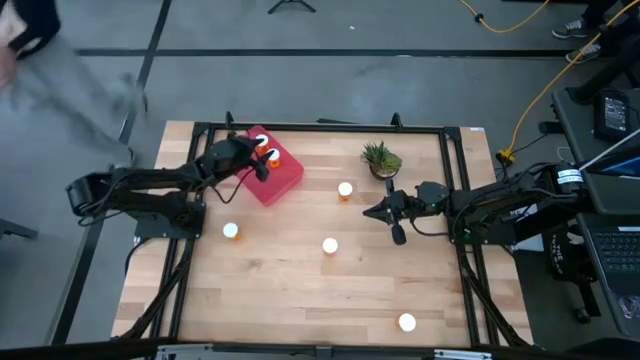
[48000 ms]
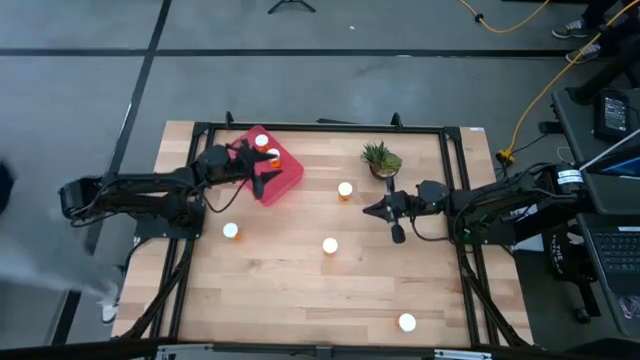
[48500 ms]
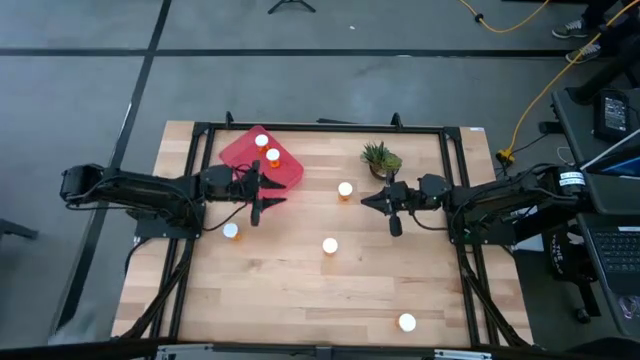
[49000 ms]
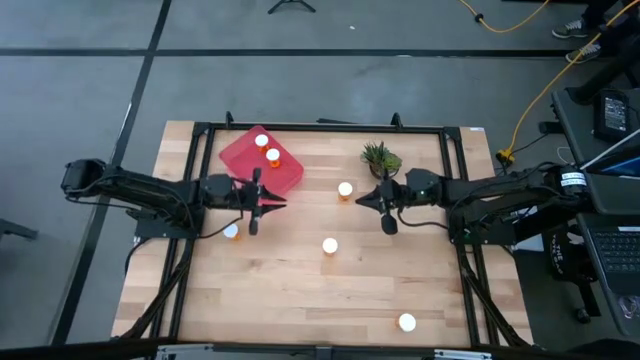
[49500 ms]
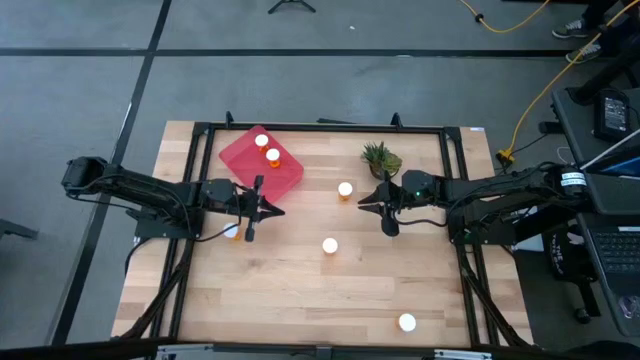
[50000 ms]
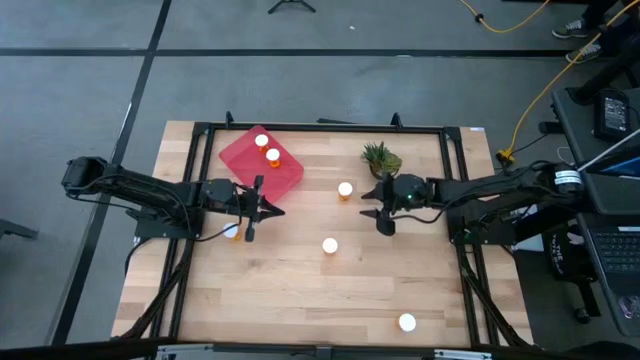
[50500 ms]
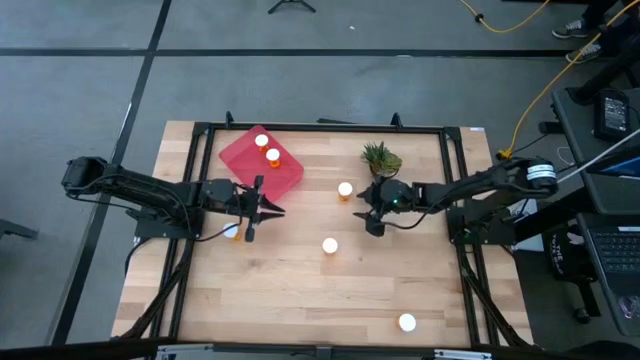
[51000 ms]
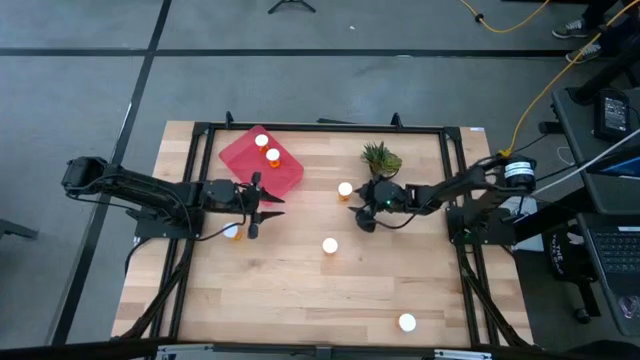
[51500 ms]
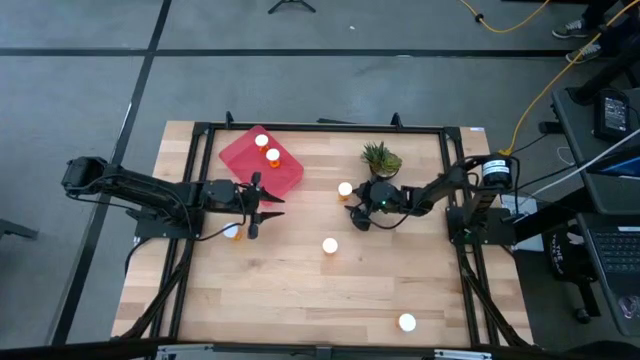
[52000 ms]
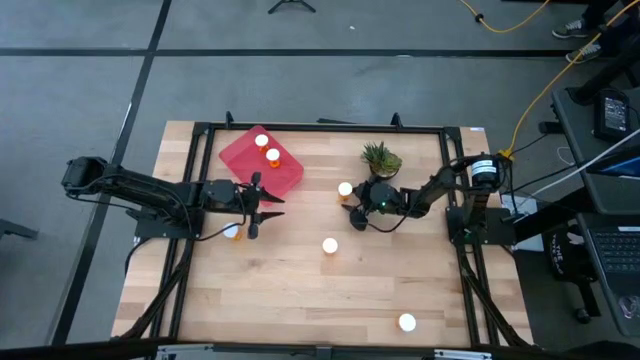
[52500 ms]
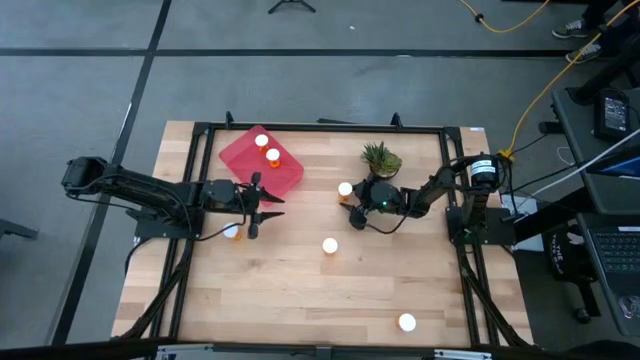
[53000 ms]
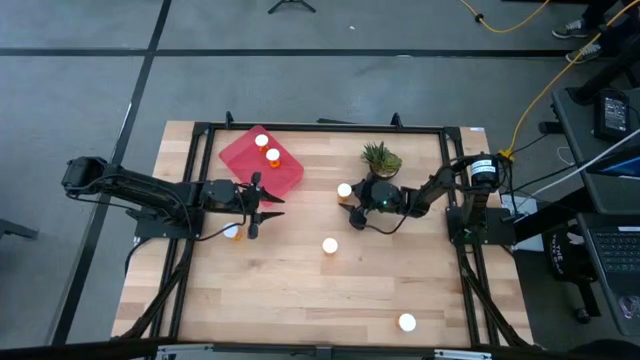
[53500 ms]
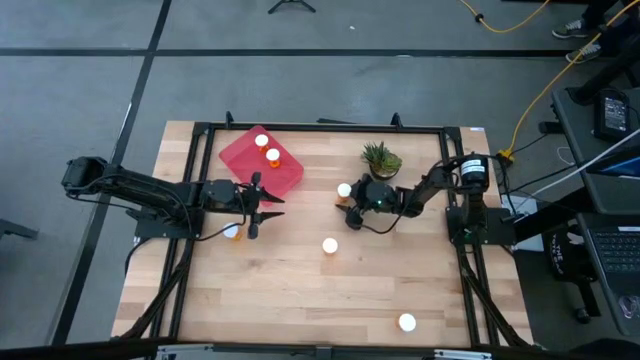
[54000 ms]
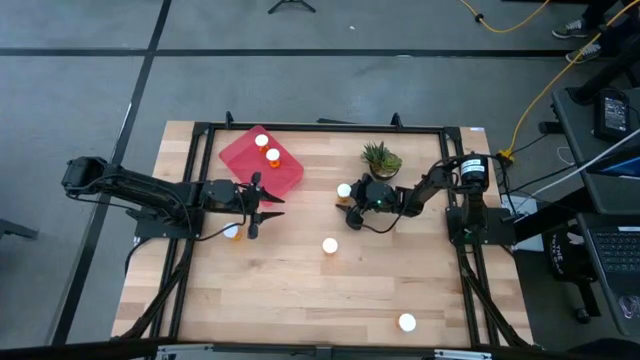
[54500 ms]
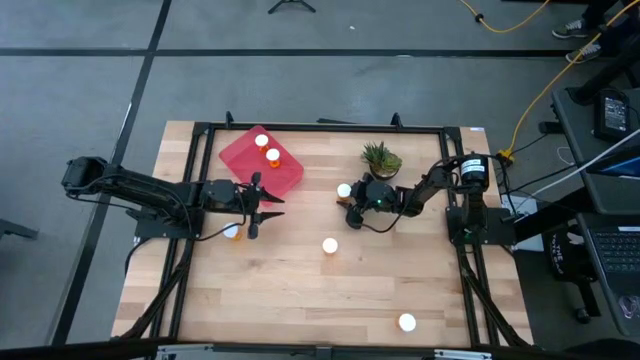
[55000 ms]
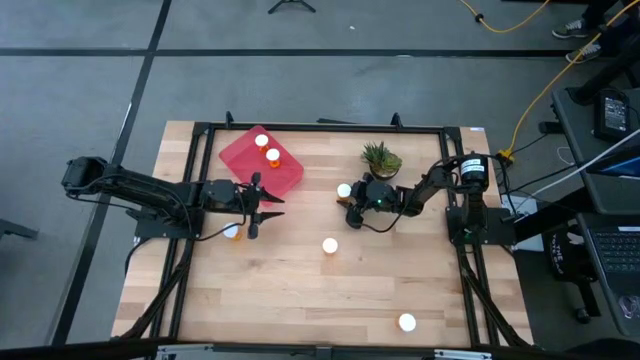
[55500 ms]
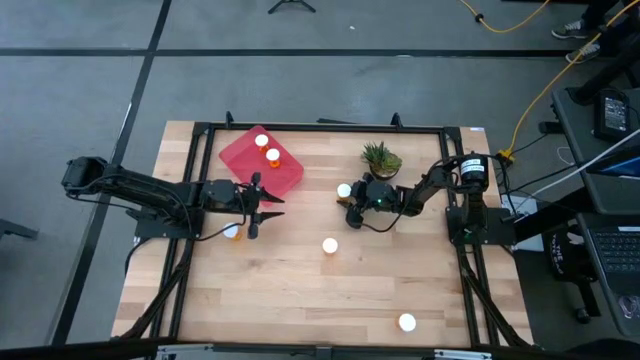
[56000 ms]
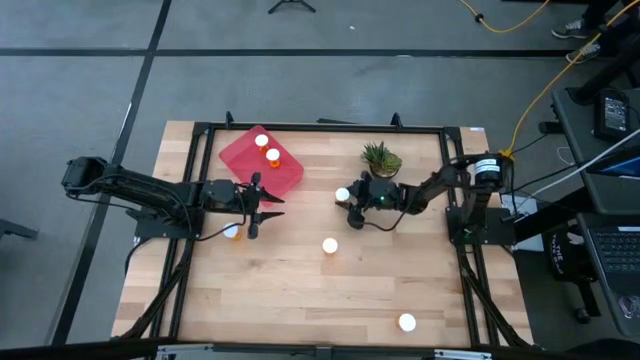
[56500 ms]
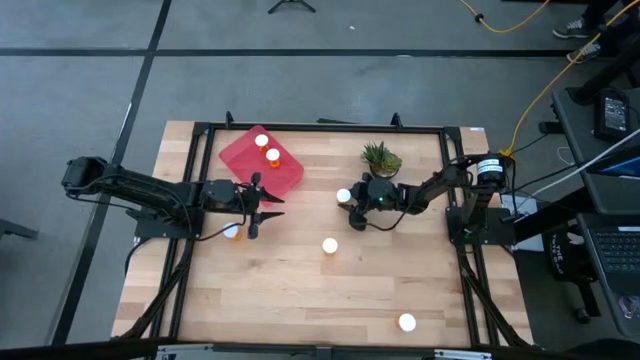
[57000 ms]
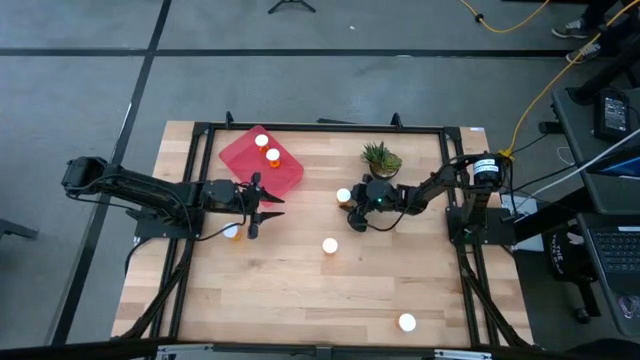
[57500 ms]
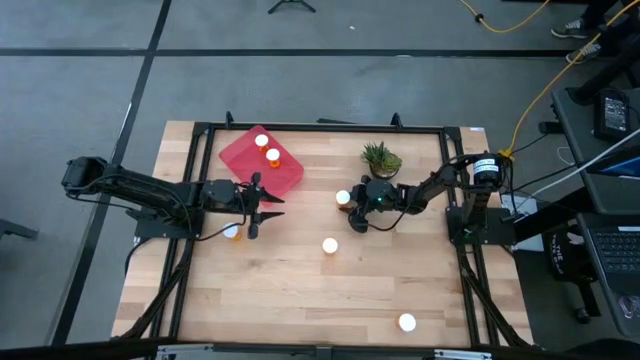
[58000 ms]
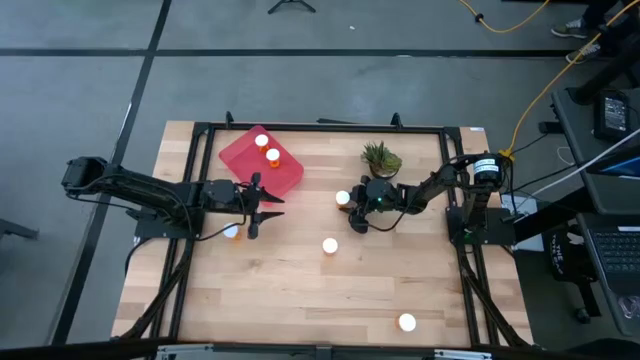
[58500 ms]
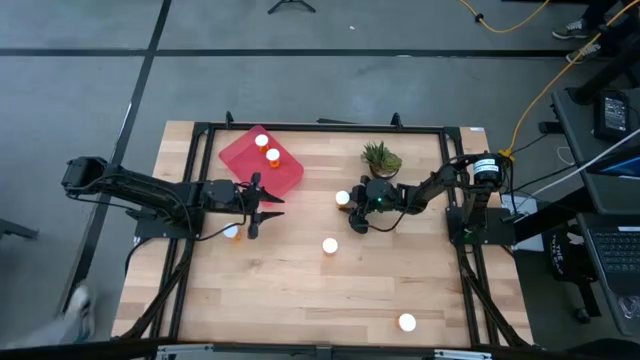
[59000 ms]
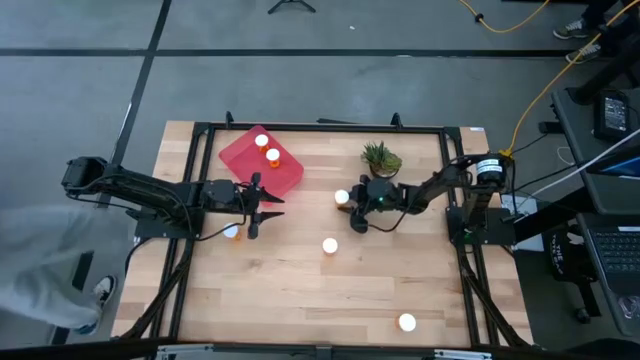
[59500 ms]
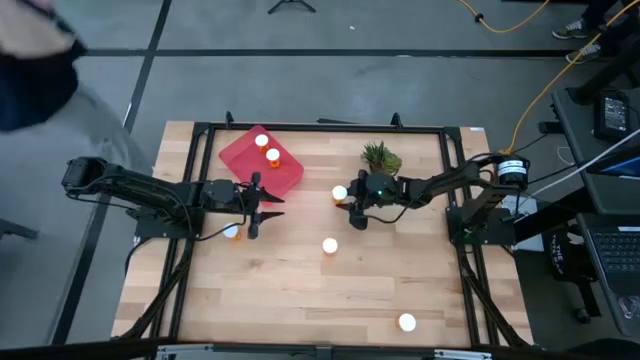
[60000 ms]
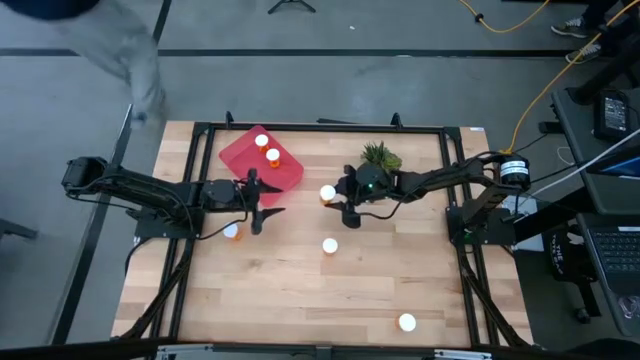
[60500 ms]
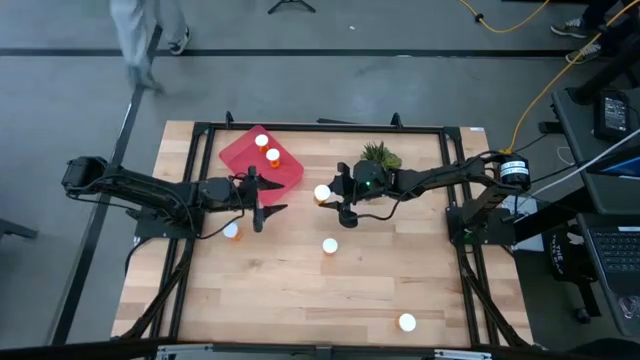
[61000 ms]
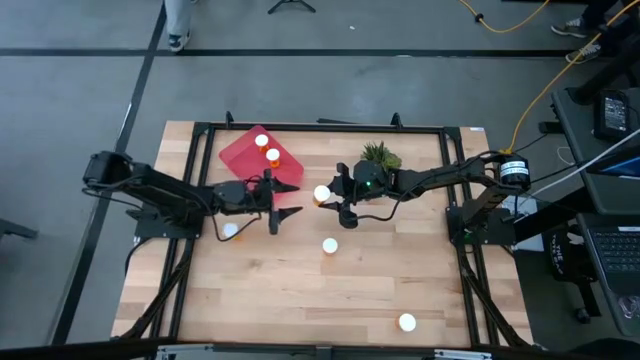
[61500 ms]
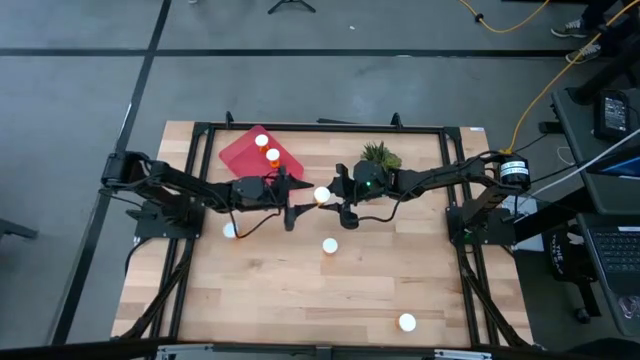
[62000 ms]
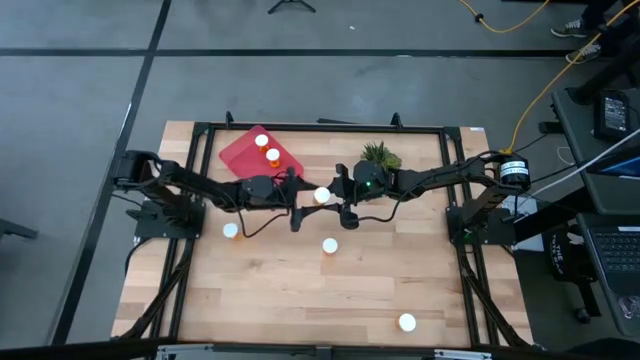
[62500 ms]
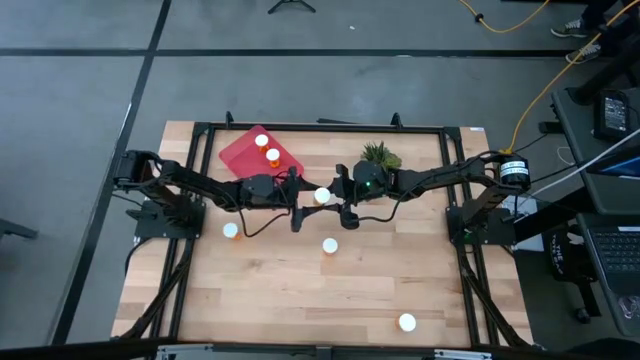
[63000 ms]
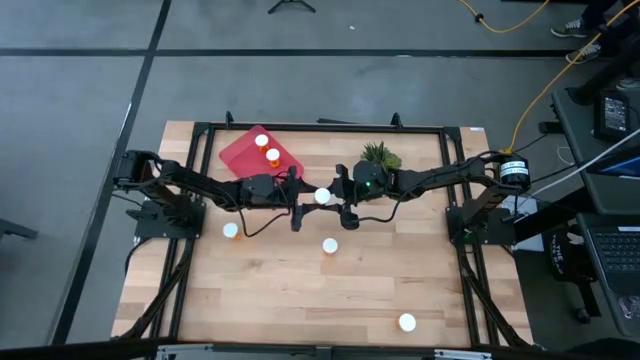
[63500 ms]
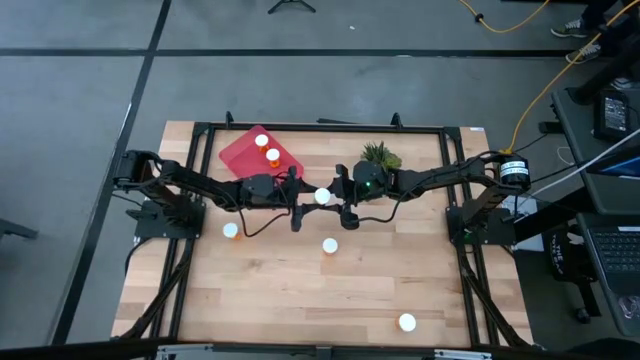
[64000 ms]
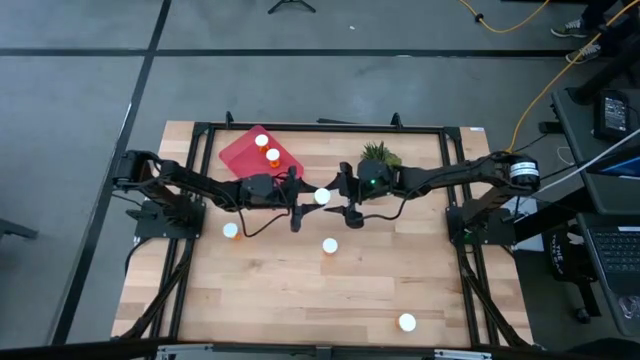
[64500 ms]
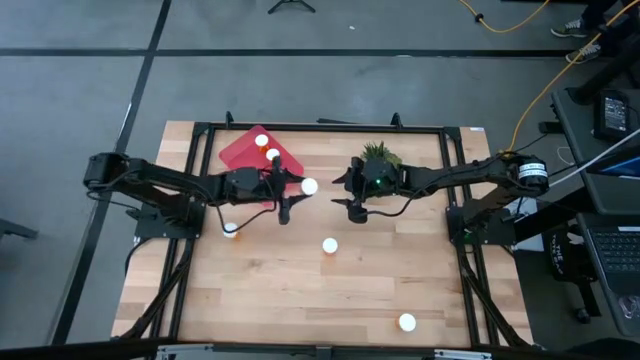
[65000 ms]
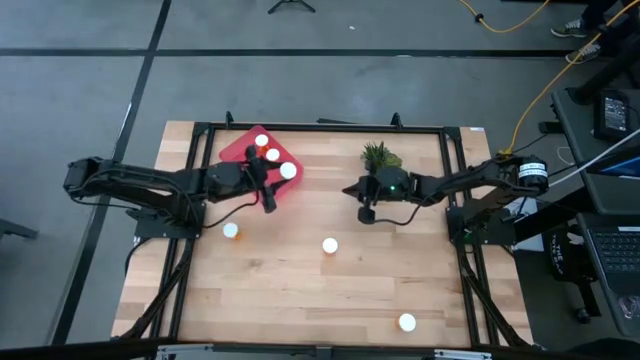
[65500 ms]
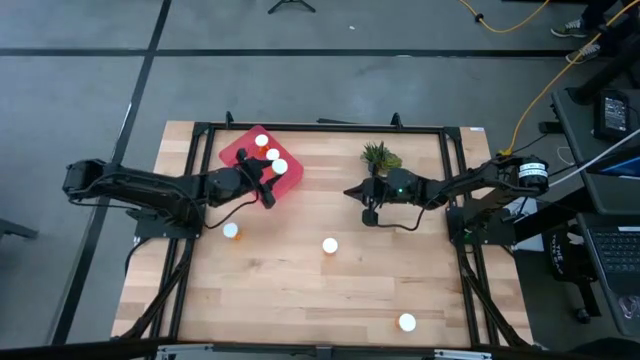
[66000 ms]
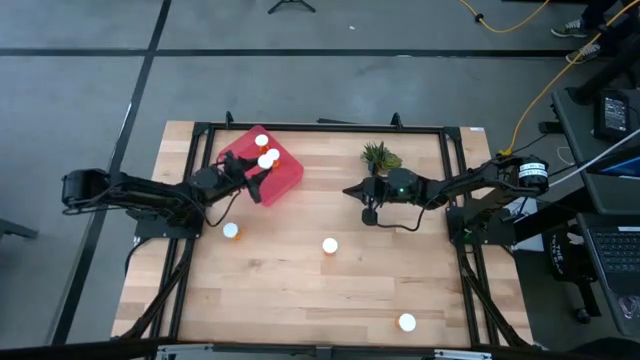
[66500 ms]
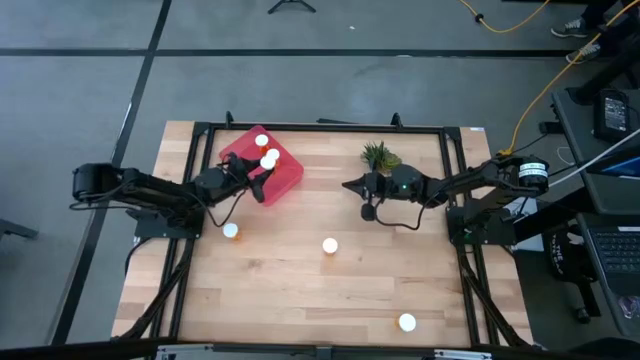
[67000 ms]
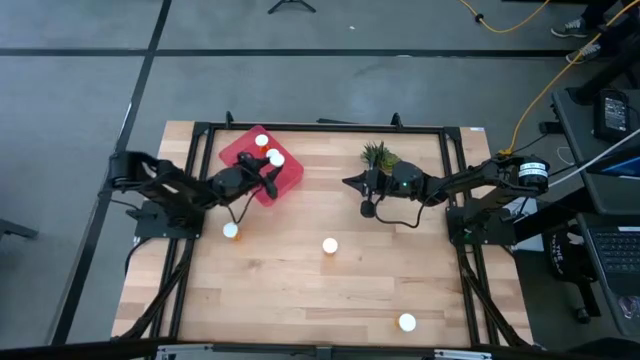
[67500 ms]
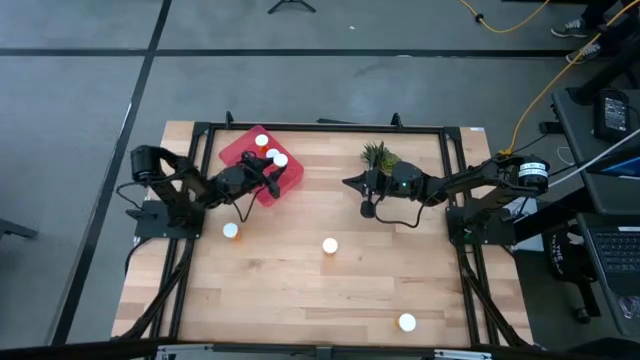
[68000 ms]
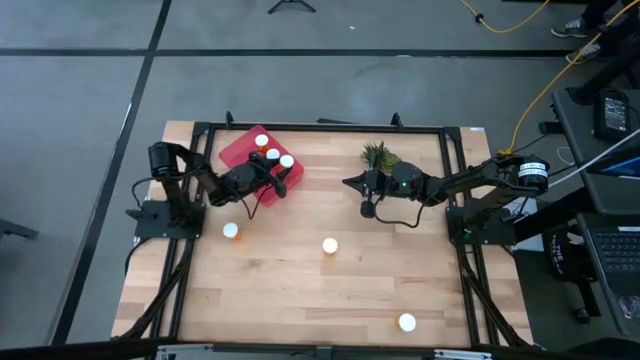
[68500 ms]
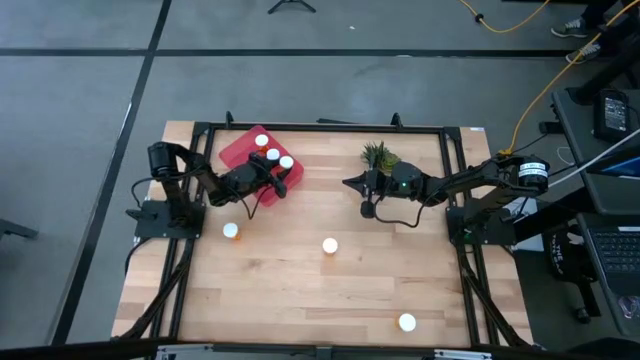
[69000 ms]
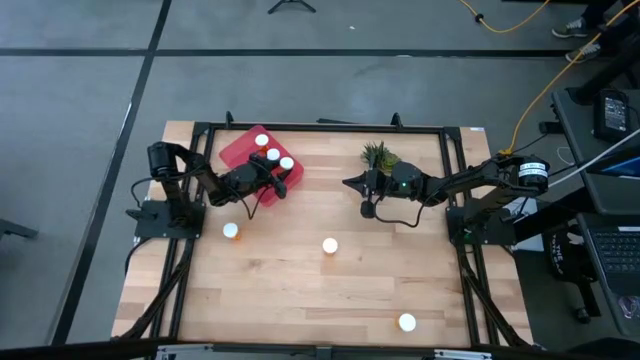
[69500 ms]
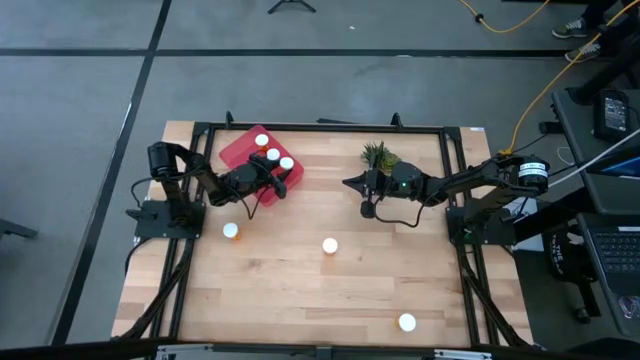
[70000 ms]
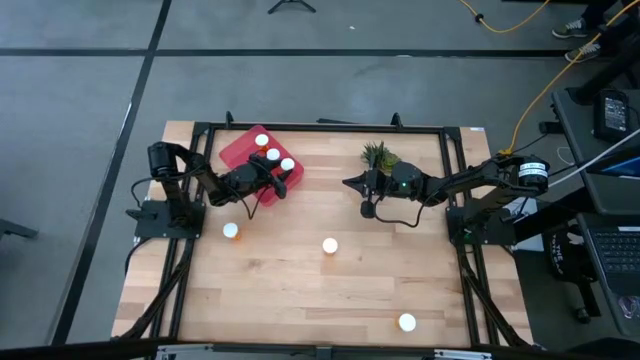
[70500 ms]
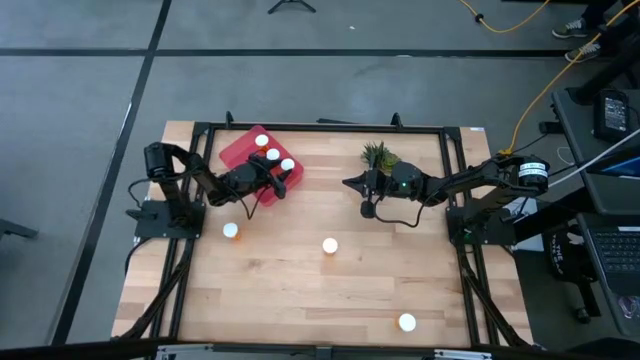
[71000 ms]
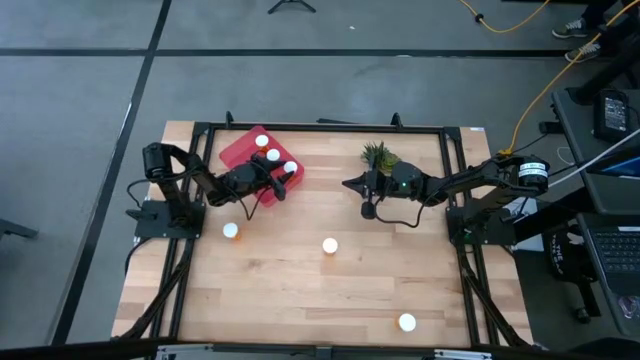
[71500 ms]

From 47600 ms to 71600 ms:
Task: Pick and place pill bottles into a basket
Put the orange pill bottle into the red container
